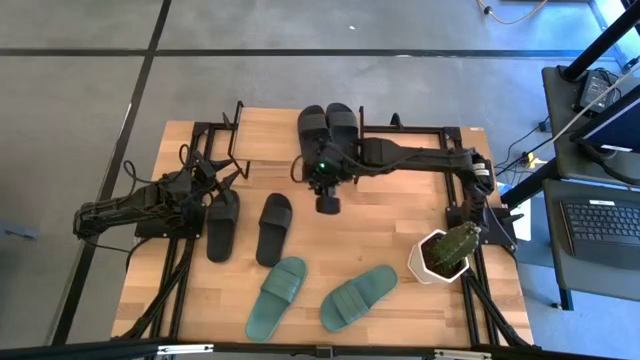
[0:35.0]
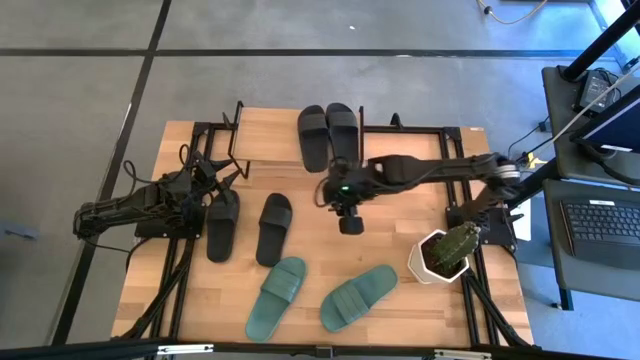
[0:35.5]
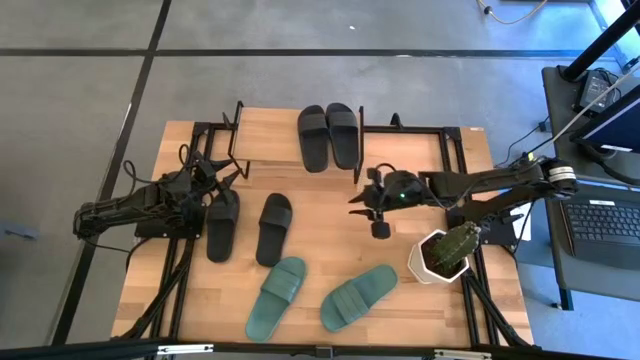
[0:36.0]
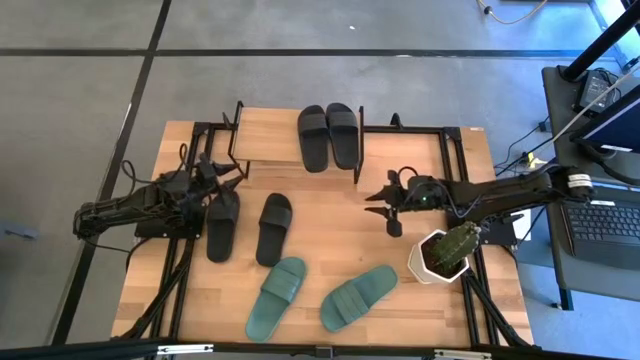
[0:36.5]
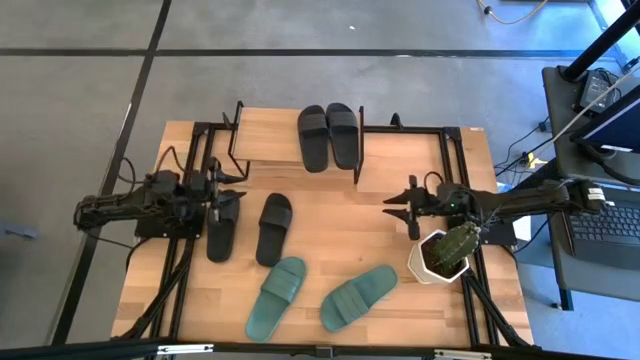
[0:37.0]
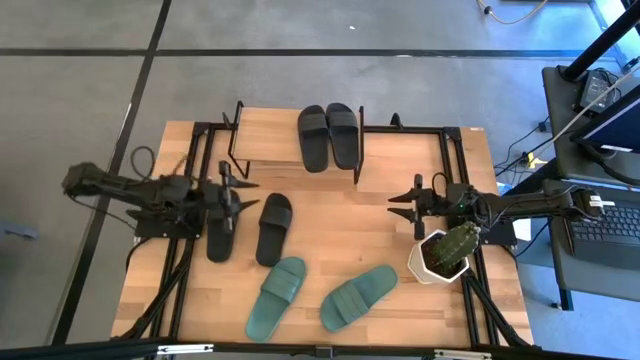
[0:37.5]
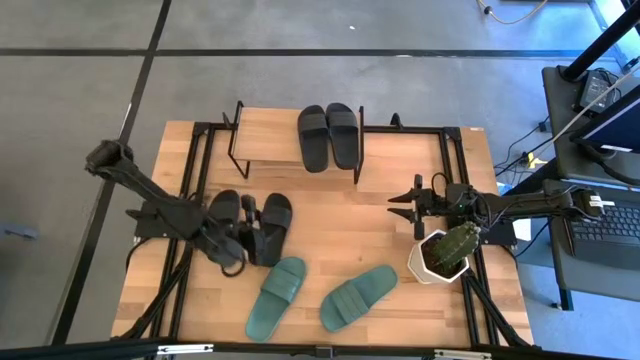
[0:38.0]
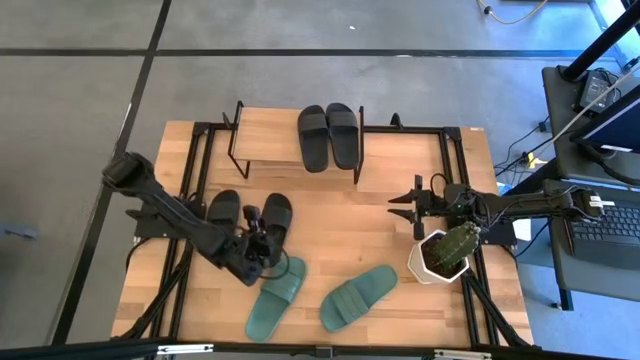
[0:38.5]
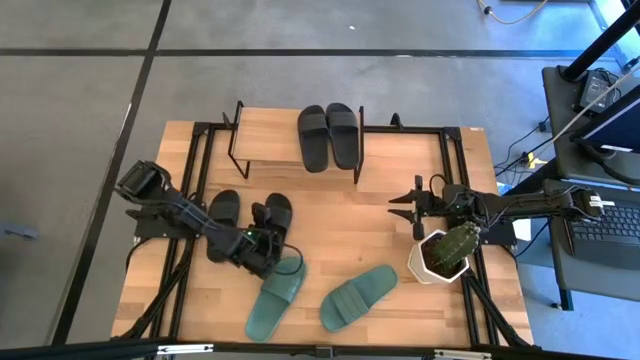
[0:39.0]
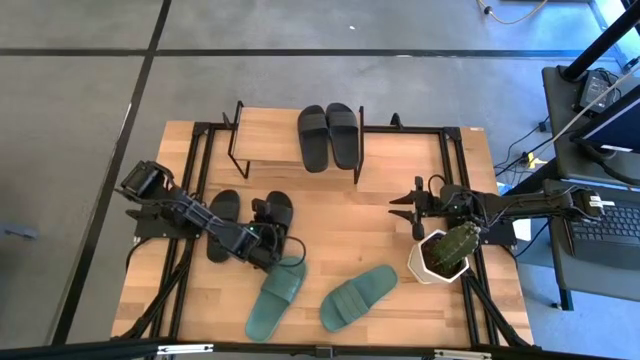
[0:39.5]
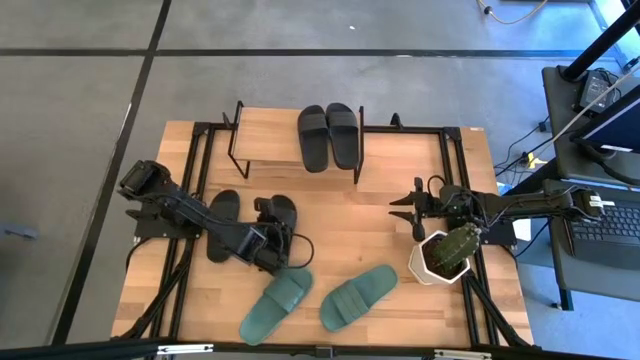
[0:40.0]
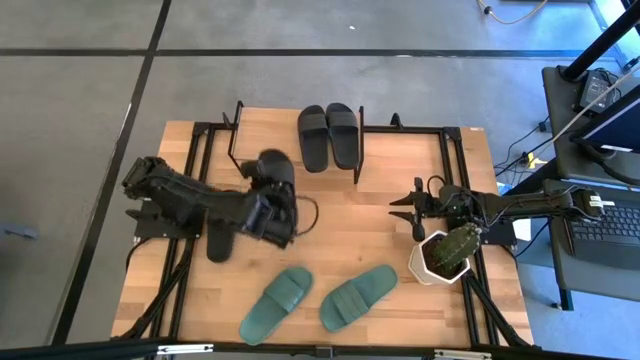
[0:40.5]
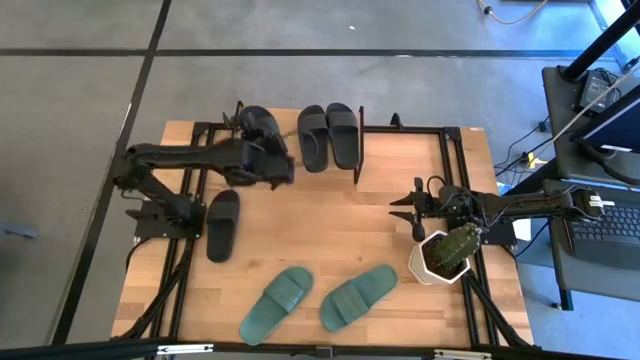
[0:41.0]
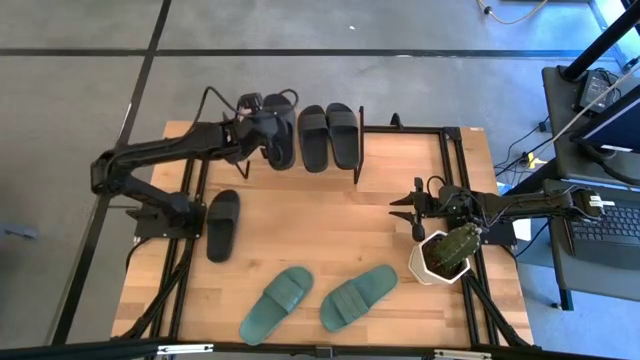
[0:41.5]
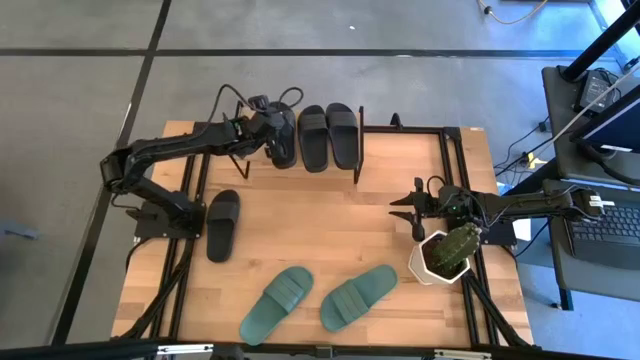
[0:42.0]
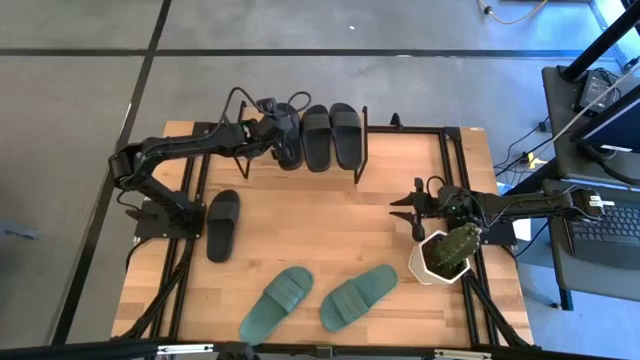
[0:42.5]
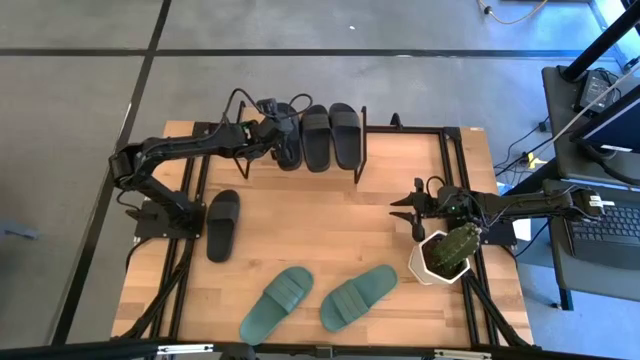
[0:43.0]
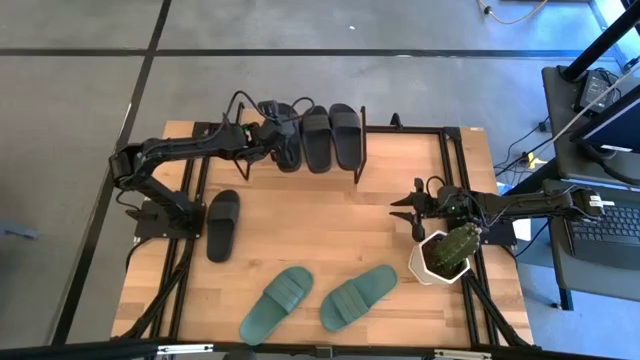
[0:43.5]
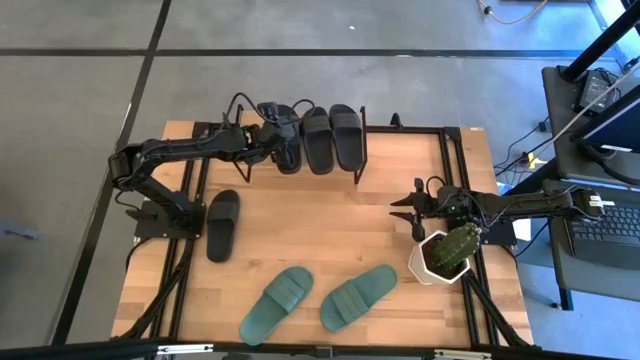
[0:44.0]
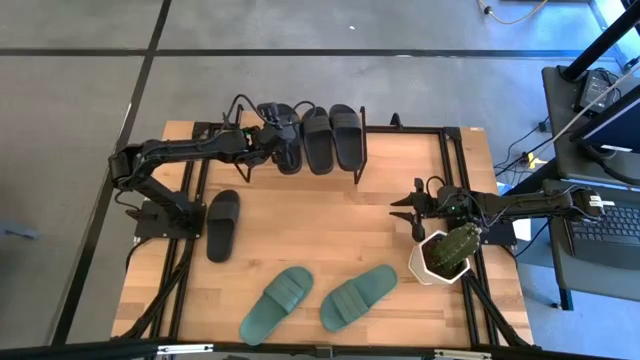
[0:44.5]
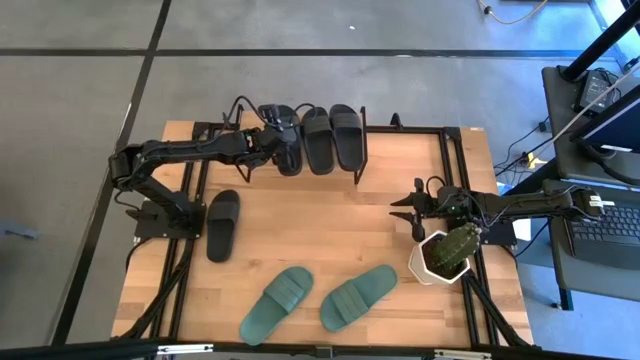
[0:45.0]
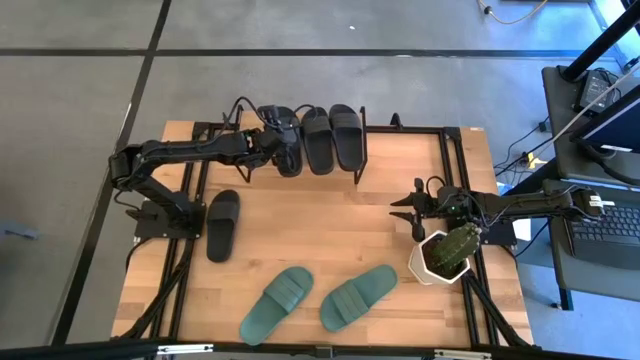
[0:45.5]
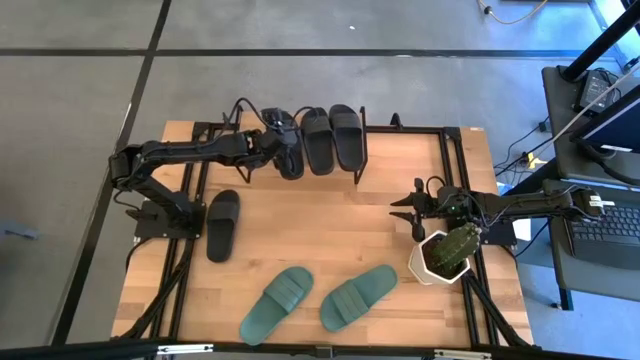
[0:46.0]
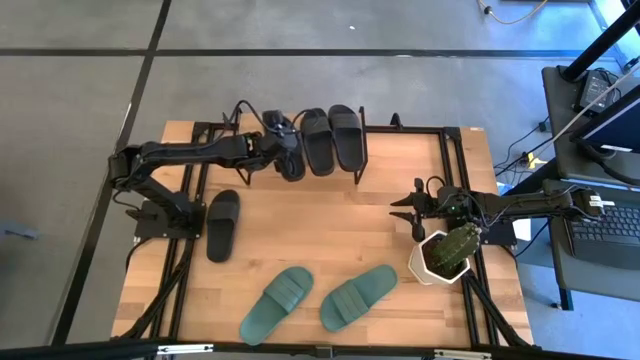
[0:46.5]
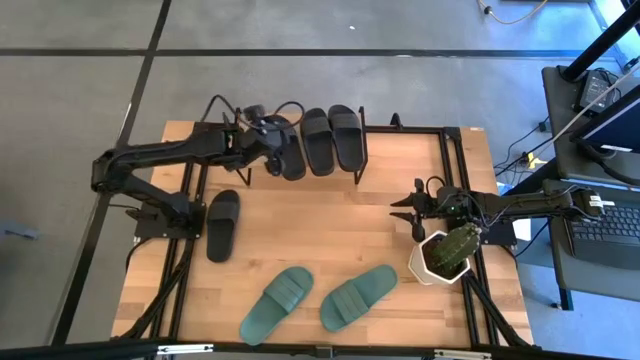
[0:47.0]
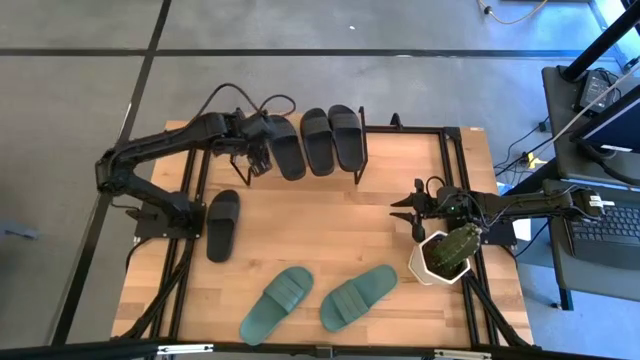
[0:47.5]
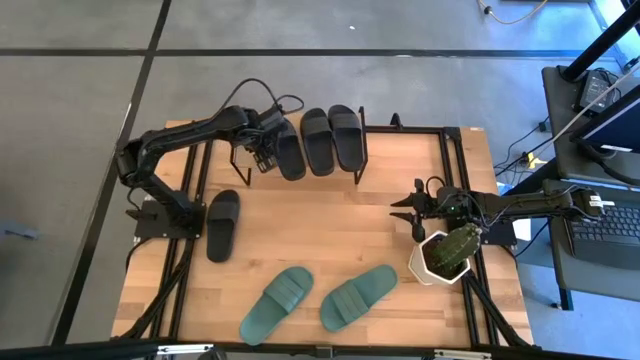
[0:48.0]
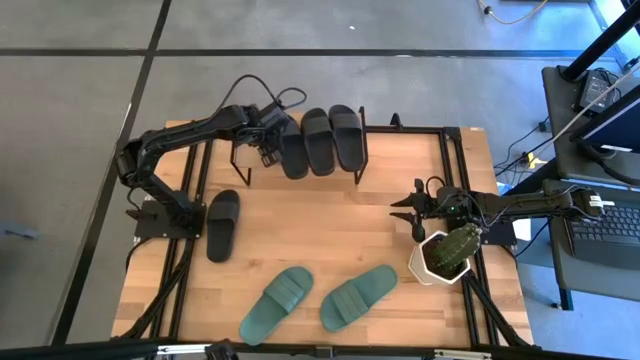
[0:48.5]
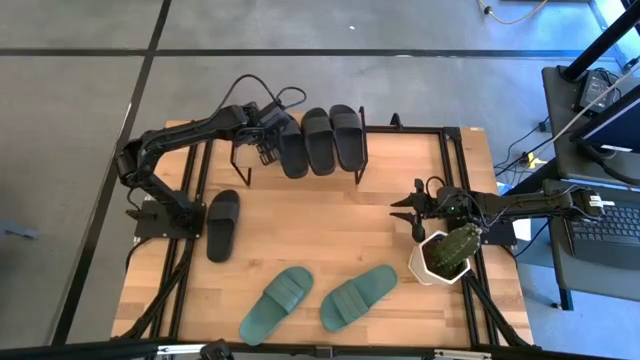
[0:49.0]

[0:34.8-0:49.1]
Task: Pick and place slides into the shelf
Put the black slide on the shelf
